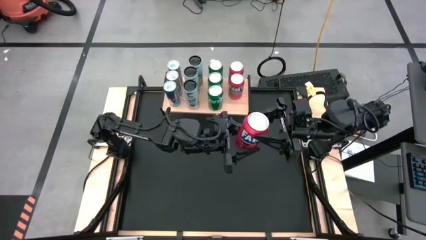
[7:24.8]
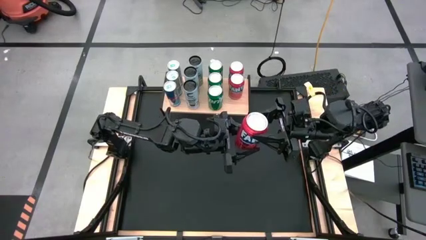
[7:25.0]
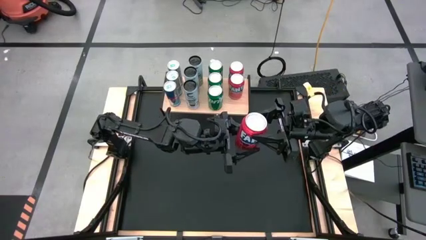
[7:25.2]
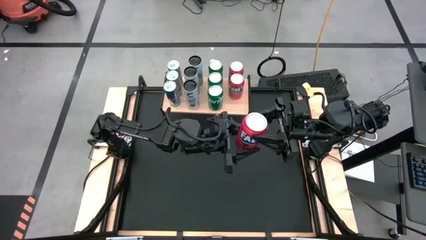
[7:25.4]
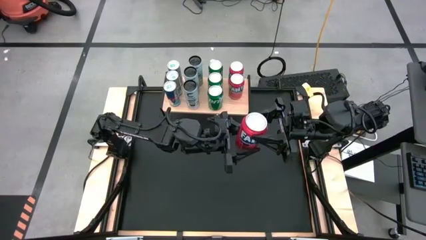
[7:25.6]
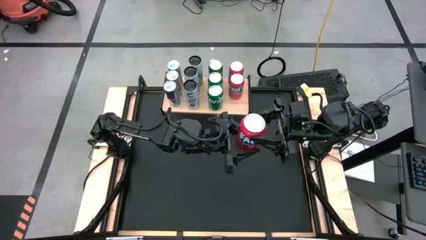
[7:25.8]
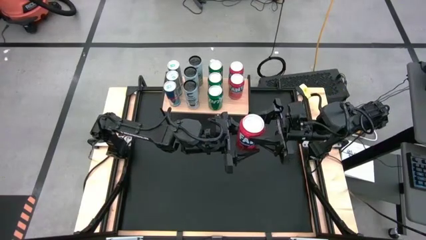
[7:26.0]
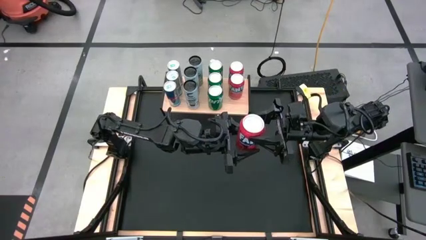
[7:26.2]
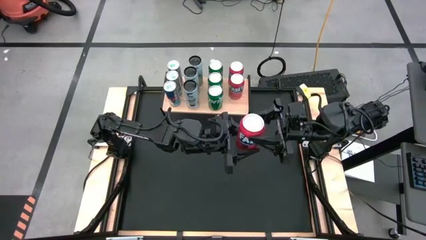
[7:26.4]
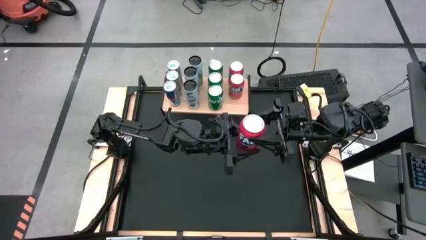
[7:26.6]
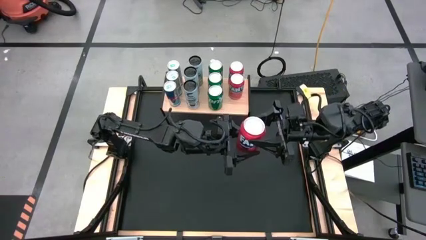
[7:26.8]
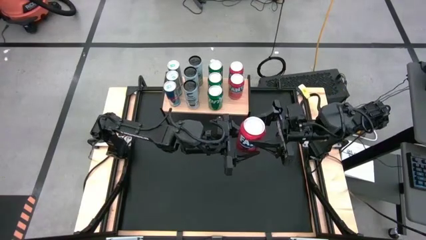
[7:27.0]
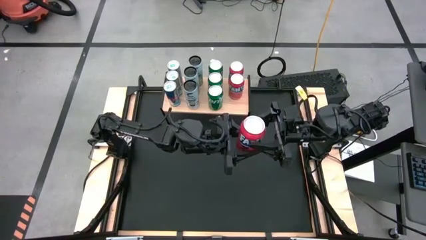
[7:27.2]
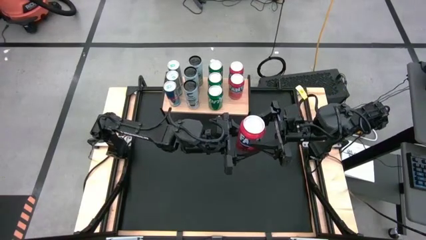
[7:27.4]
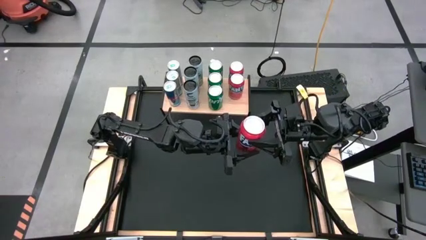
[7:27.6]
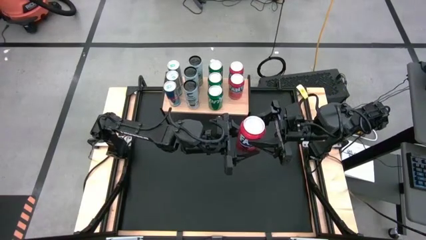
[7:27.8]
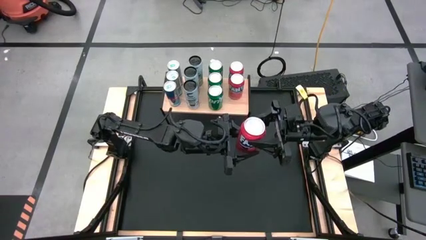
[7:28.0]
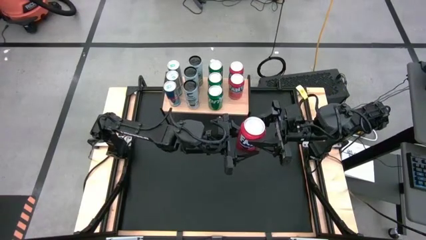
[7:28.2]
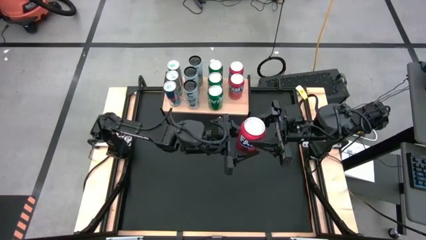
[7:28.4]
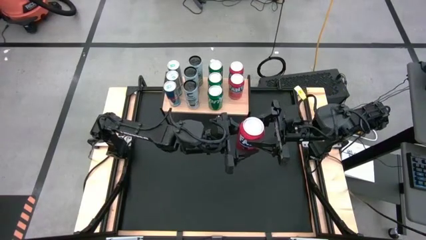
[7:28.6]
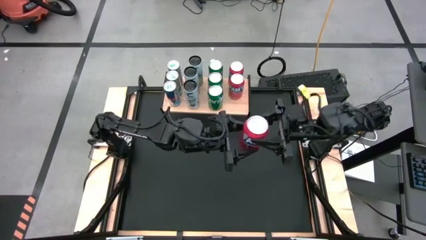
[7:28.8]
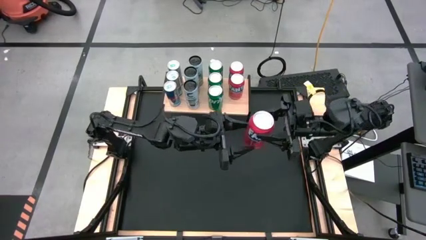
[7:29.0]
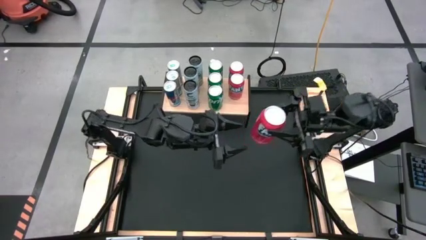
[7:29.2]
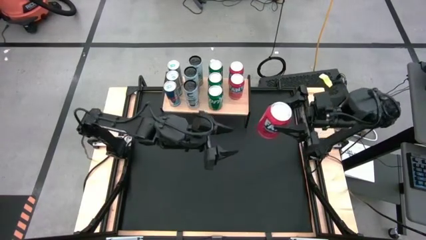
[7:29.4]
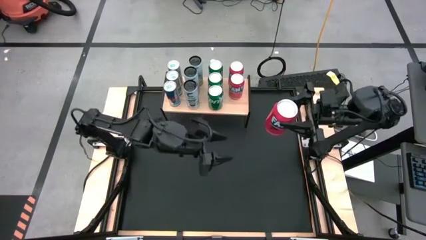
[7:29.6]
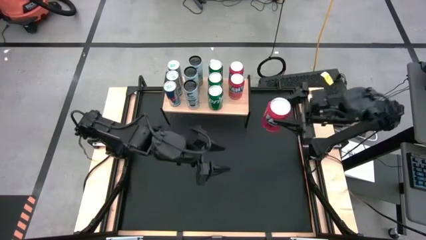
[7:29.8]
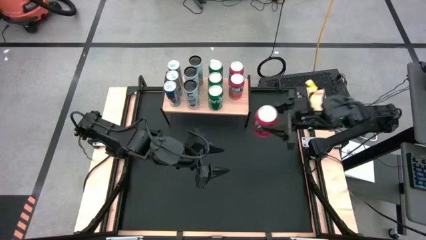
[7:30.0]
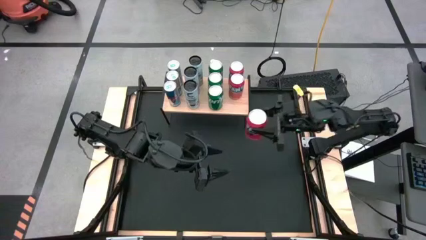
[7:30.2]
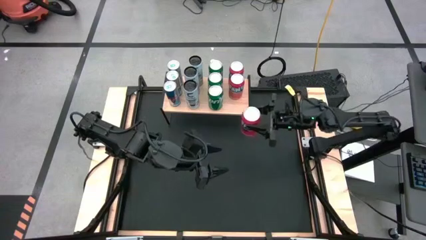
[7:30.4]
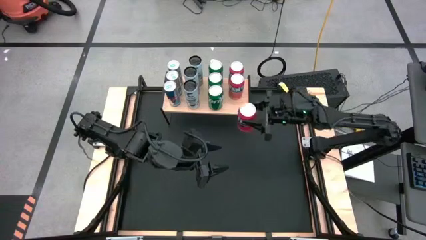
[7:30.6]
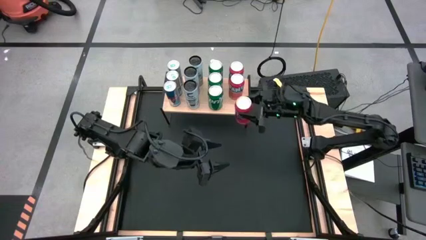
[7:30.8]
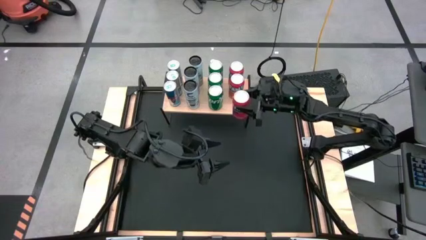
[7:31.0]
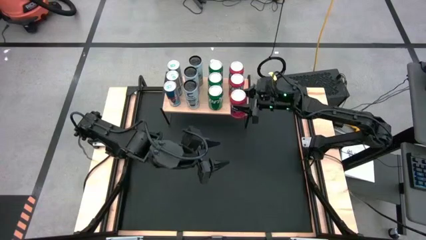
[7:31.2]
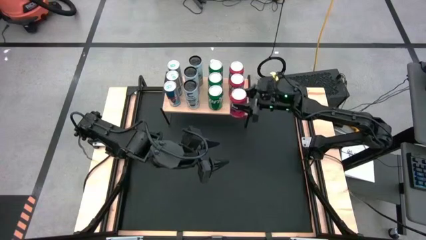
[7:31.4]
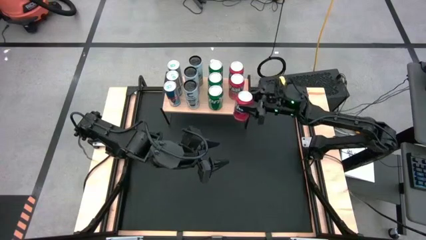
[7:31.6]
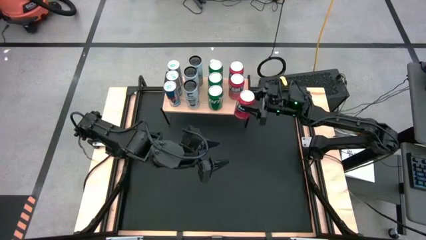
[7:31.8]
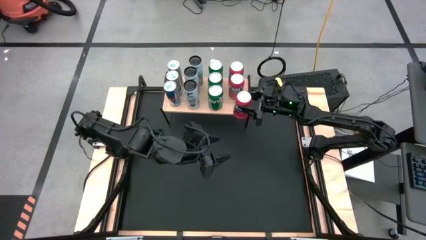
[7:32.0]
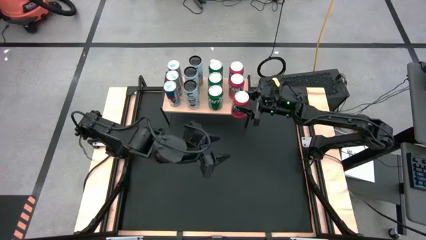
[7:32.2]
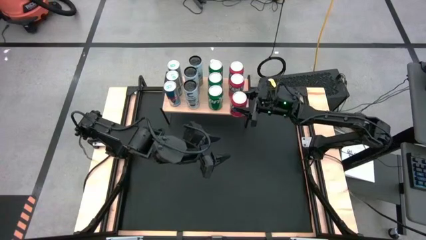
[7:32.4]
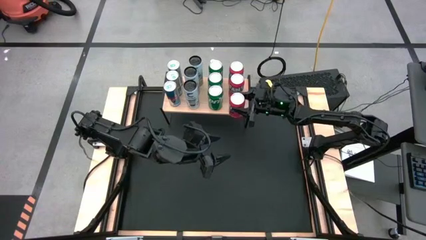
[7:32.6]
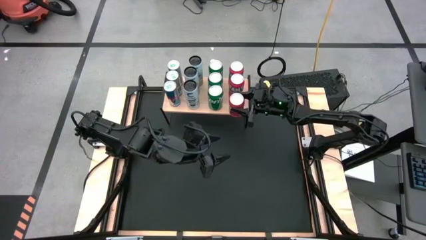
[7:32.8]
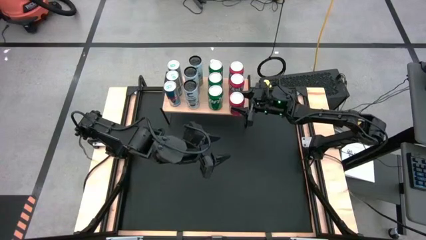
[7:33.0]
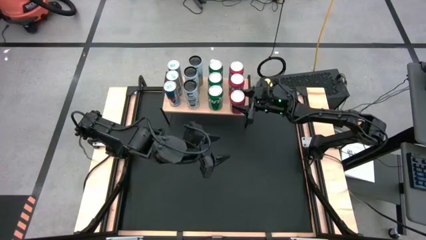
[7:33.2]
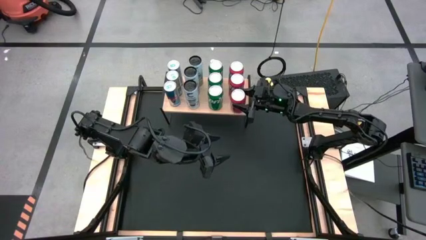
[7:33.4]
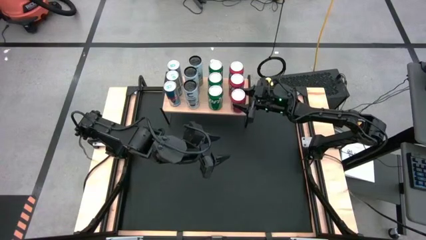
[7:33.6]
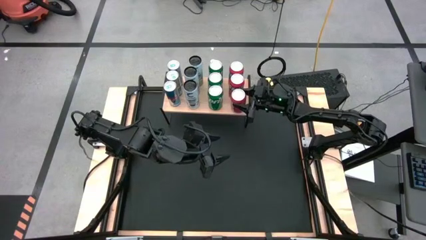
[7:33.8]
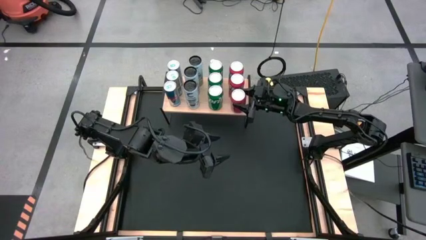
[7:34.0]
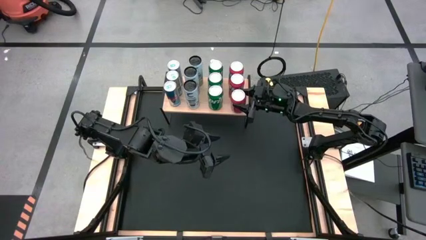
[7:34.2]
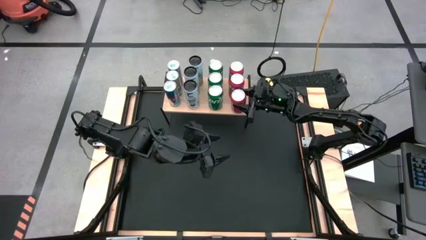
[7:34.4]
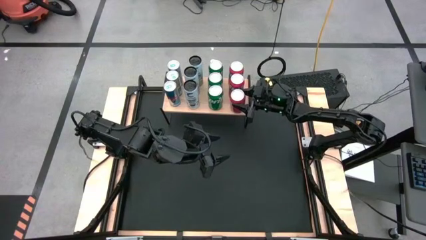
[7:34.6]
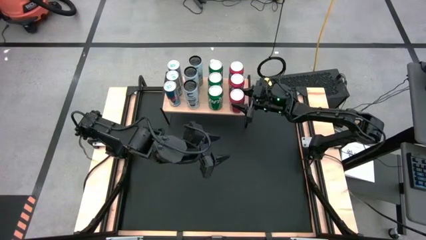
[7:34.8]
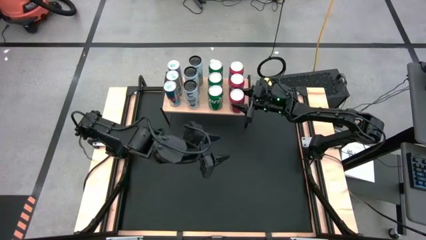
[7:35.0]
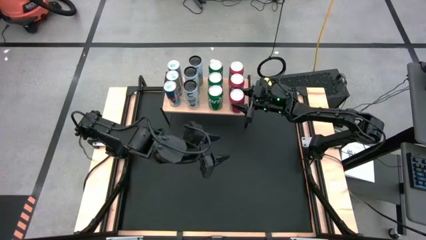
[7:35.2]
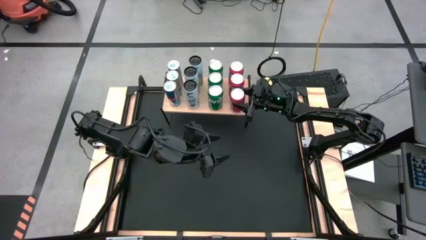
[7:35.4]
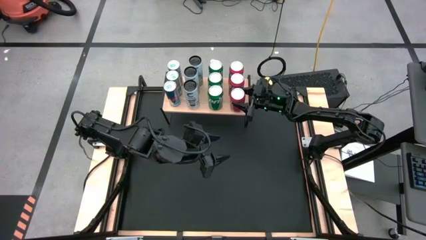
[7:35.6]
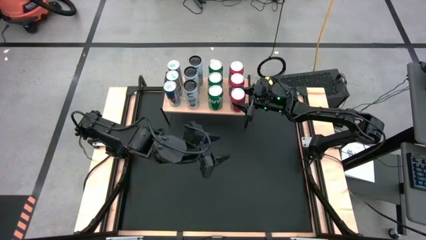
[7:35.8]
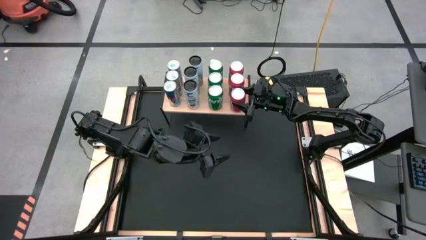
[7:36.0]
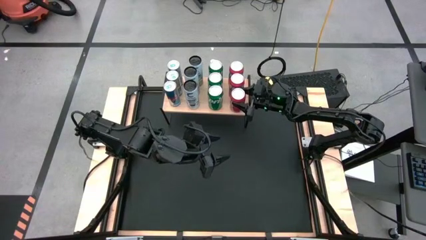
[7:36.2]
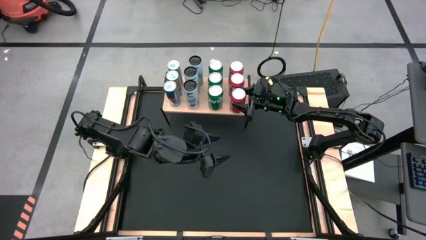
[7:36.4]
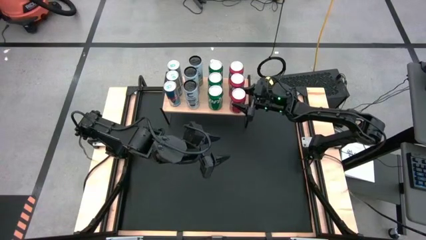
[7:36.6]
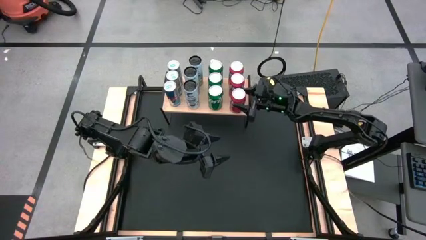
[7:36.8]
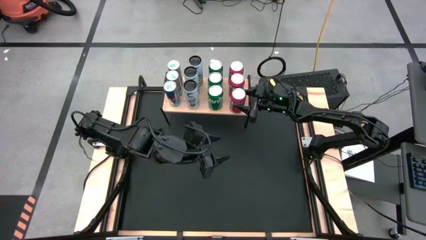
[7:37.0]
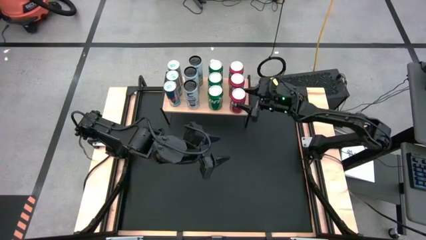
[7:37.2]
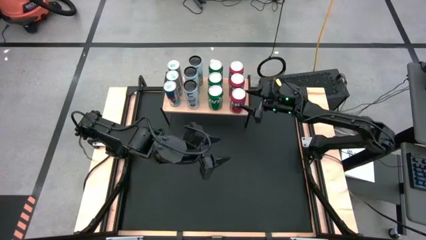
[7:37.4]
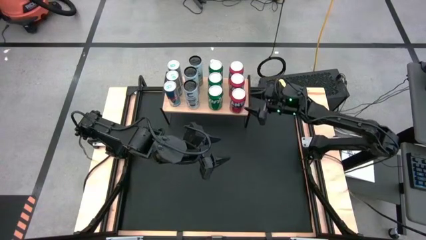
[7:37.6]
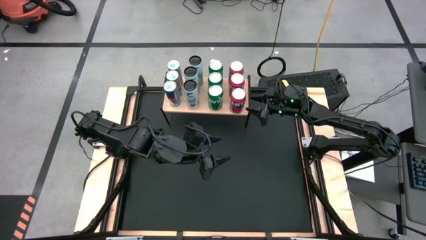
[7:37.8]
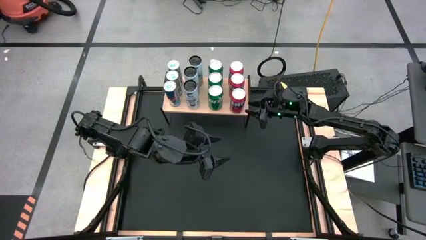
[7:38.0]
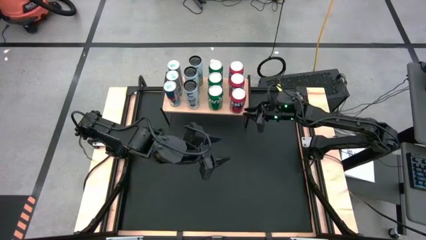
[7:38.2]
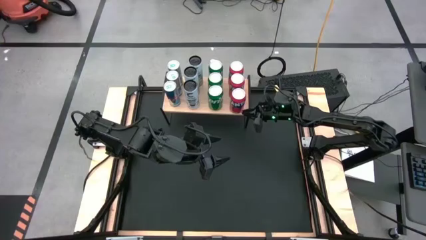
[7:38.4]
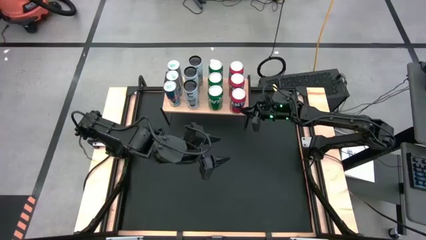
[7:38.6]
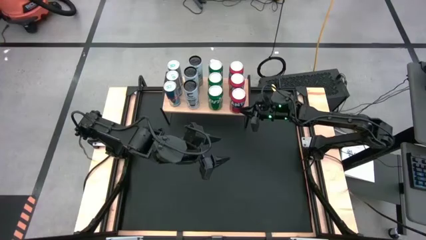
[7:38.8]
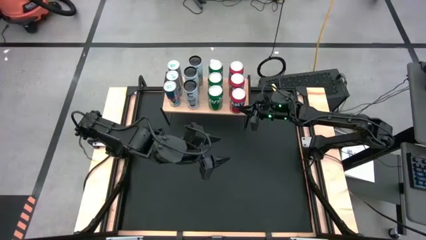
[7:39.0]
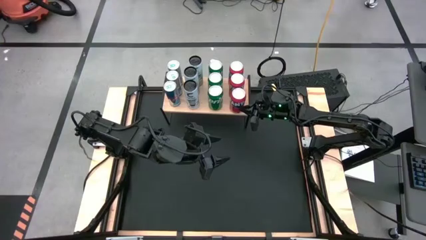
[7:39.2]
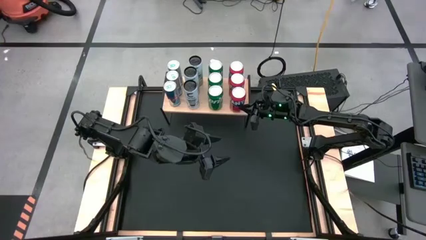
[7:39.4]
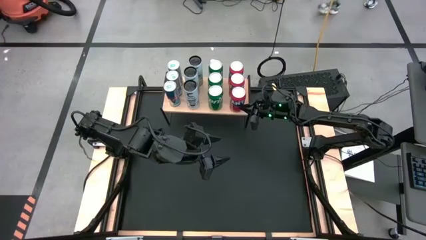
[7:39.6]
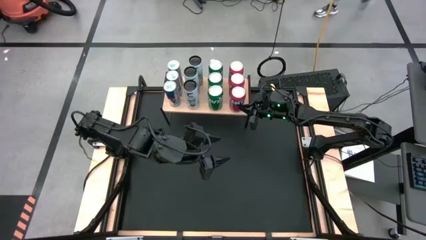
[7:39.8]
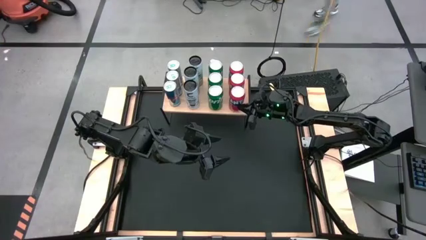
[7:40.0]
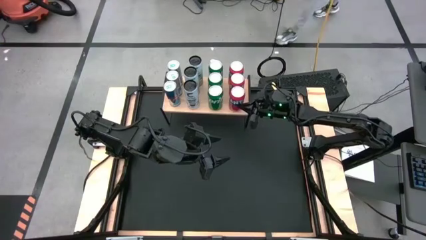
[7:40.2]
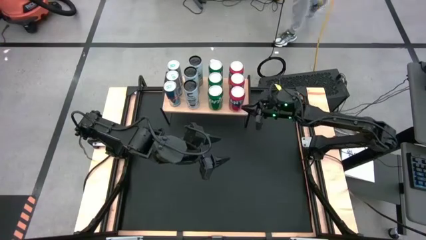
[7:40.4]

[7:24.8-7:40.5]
Task: Place canned beverage on shelf
Put the orange soda can on the shelf
